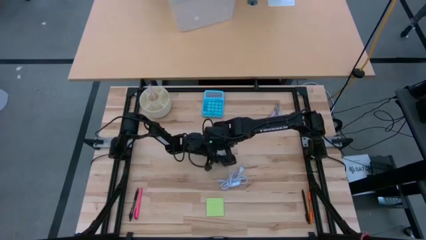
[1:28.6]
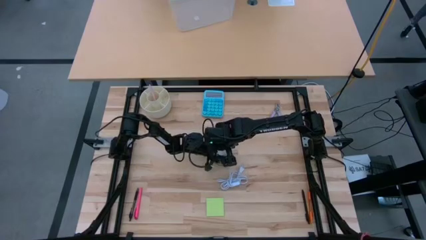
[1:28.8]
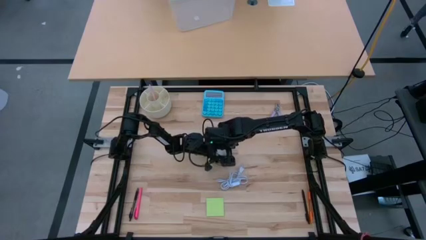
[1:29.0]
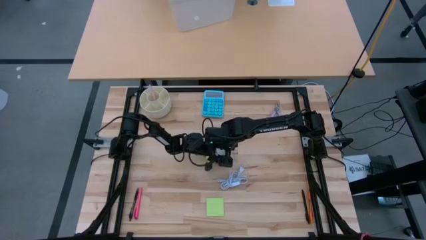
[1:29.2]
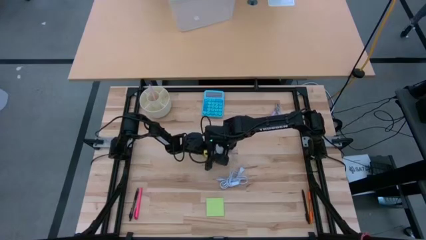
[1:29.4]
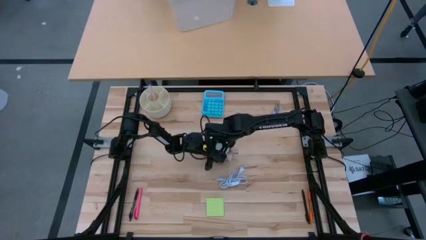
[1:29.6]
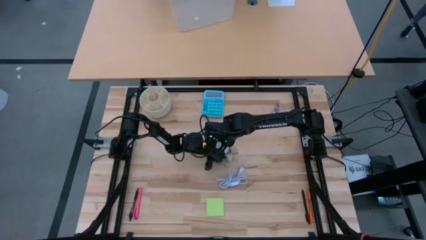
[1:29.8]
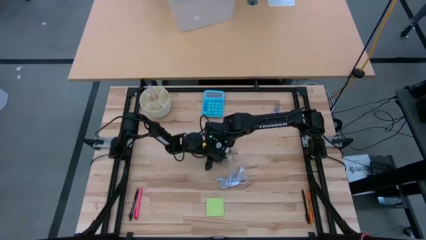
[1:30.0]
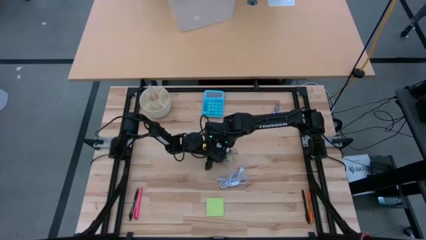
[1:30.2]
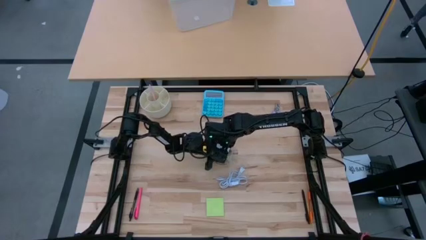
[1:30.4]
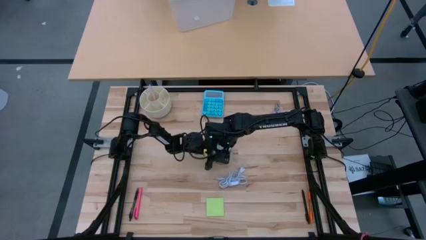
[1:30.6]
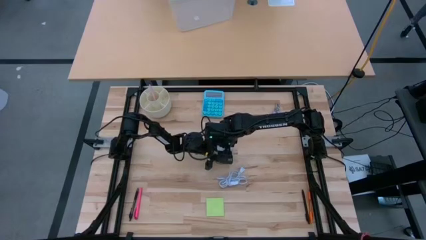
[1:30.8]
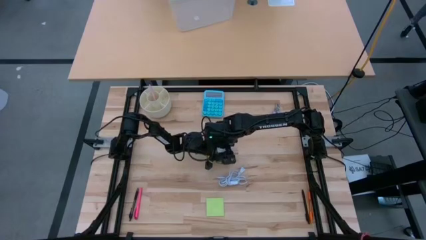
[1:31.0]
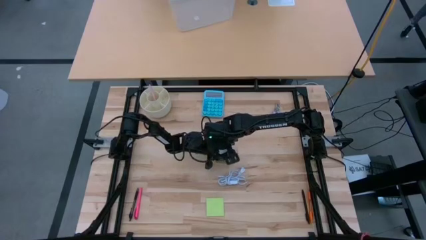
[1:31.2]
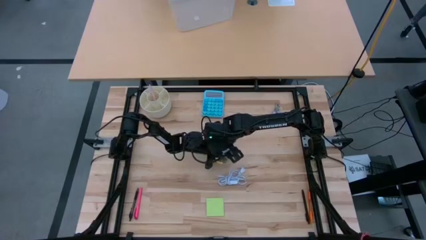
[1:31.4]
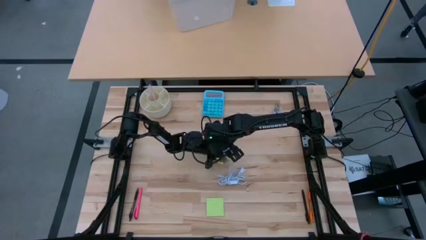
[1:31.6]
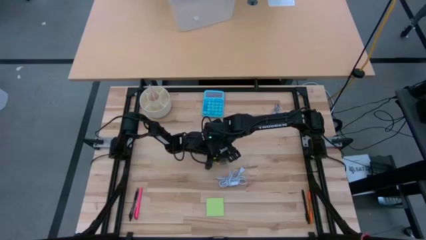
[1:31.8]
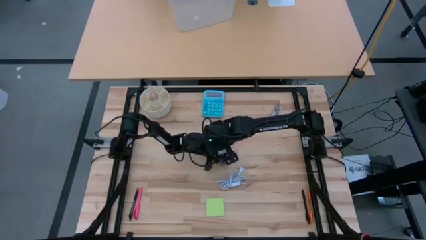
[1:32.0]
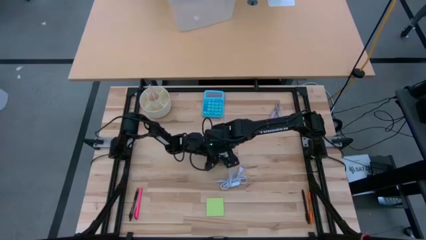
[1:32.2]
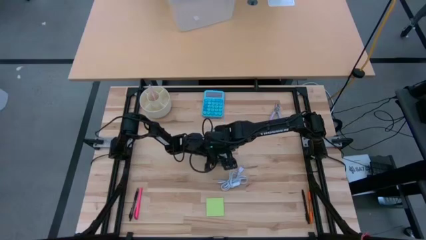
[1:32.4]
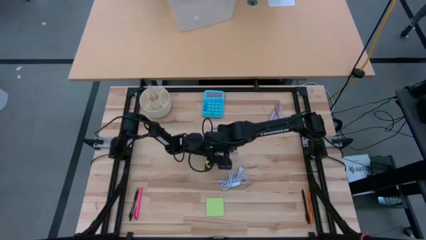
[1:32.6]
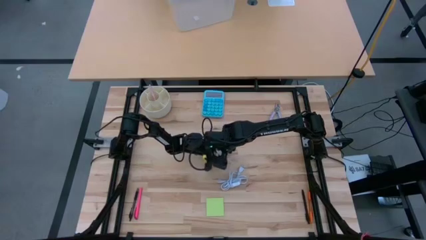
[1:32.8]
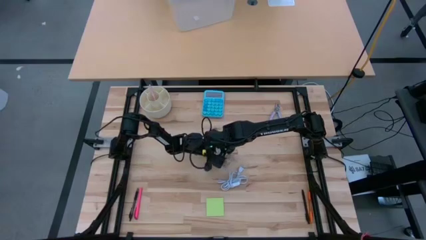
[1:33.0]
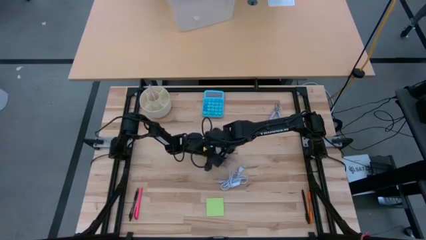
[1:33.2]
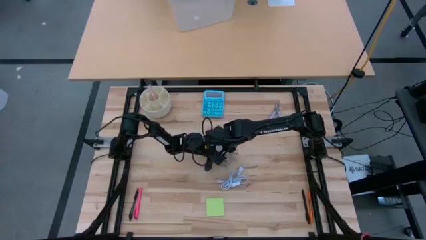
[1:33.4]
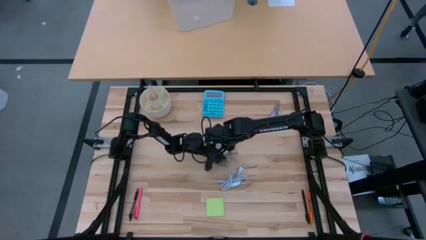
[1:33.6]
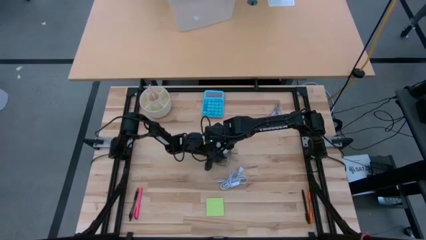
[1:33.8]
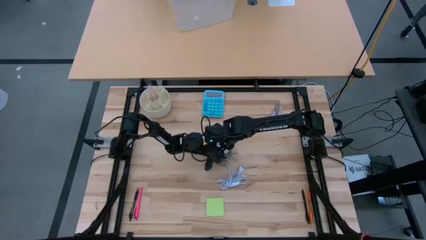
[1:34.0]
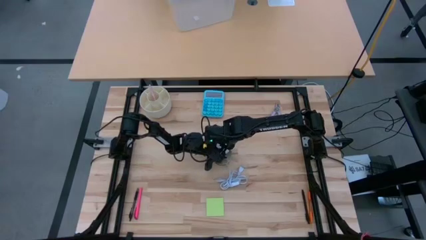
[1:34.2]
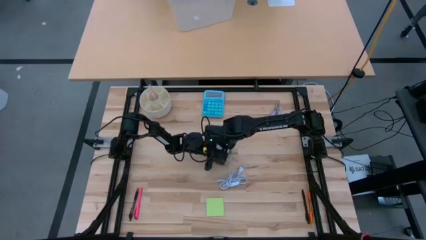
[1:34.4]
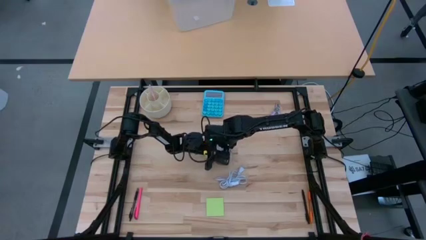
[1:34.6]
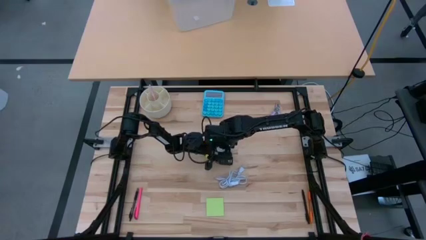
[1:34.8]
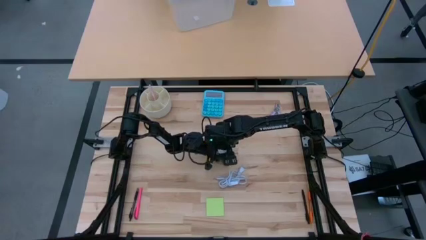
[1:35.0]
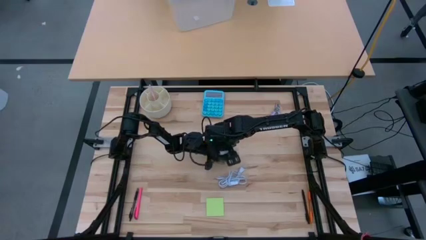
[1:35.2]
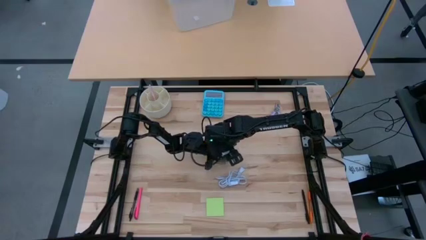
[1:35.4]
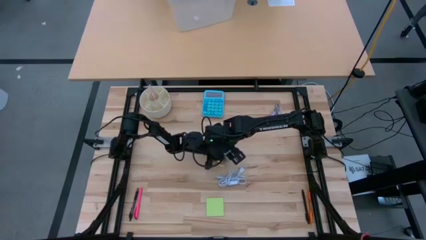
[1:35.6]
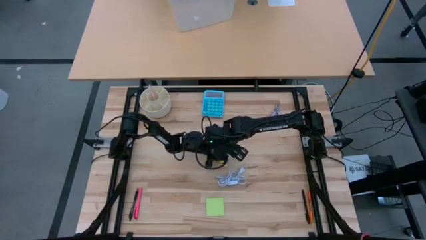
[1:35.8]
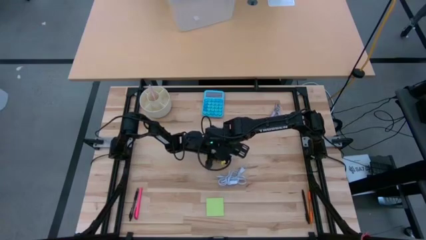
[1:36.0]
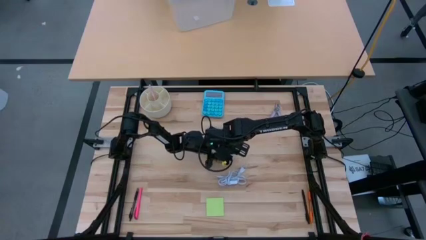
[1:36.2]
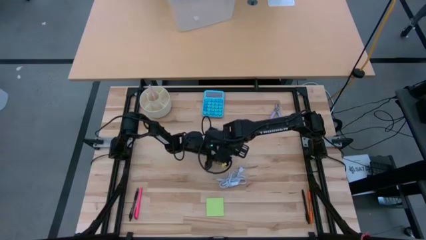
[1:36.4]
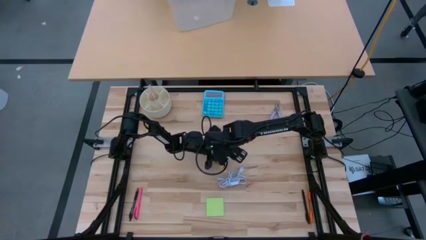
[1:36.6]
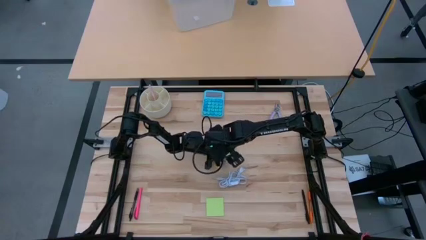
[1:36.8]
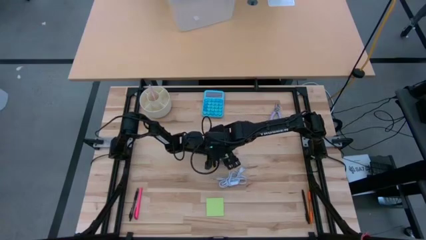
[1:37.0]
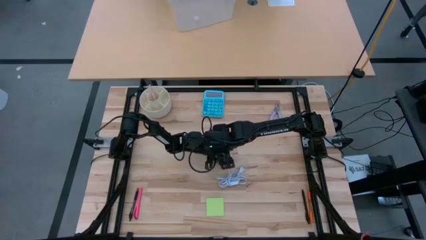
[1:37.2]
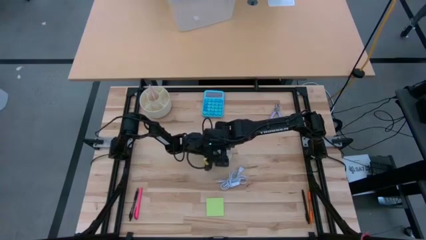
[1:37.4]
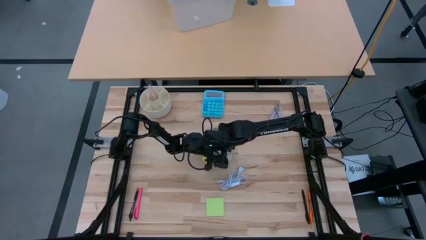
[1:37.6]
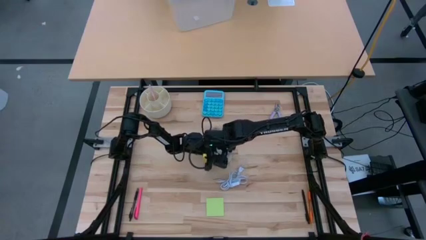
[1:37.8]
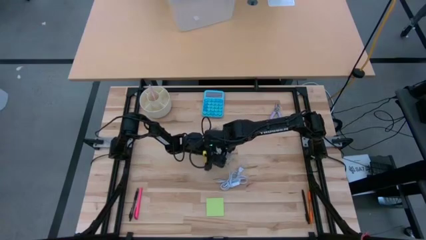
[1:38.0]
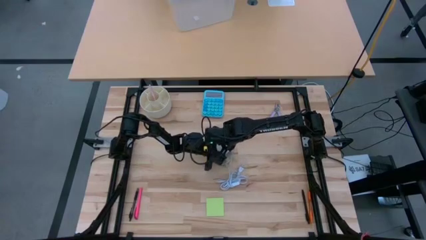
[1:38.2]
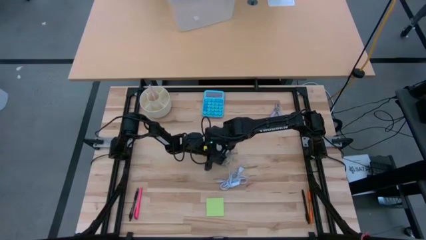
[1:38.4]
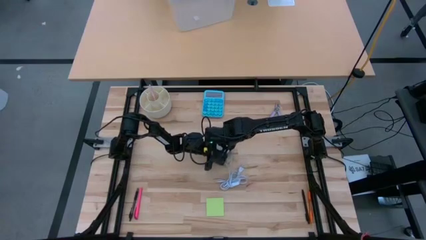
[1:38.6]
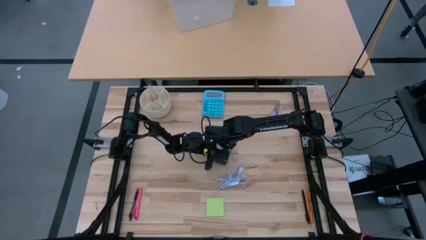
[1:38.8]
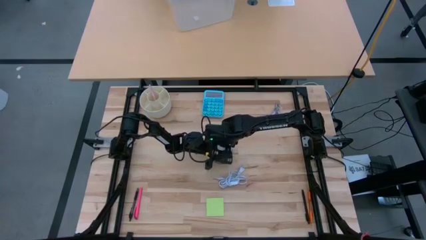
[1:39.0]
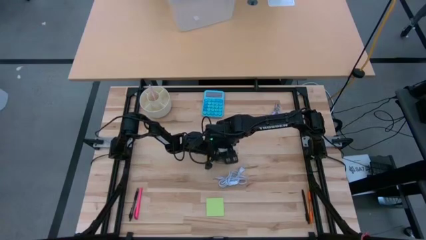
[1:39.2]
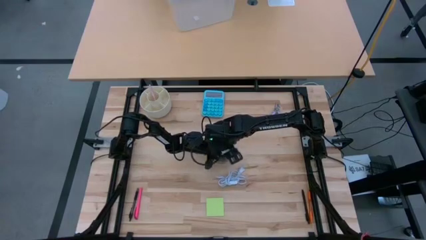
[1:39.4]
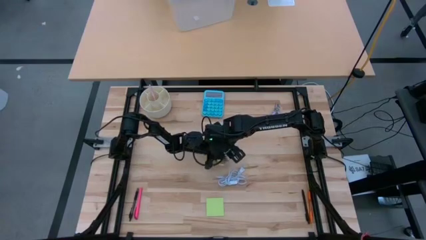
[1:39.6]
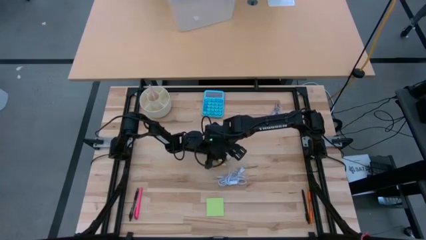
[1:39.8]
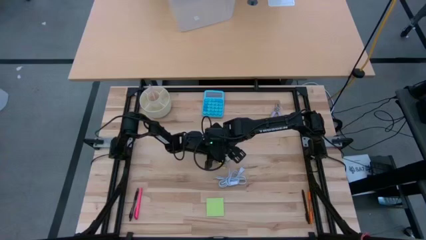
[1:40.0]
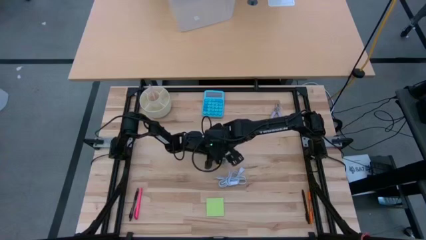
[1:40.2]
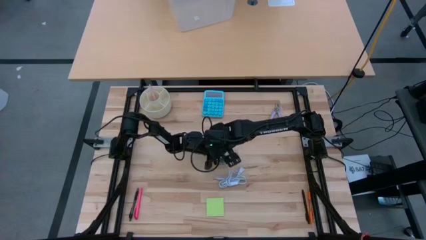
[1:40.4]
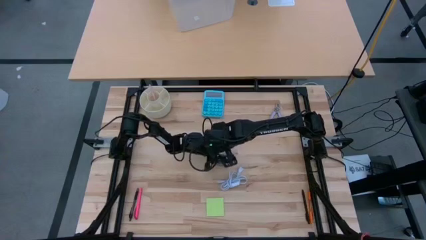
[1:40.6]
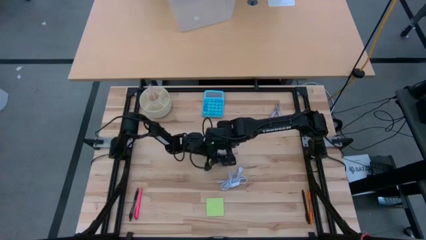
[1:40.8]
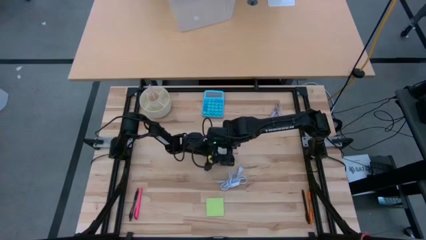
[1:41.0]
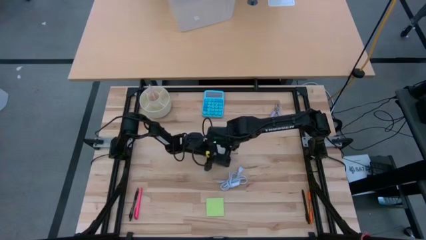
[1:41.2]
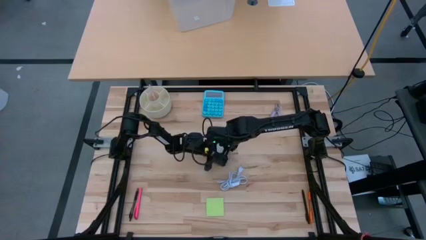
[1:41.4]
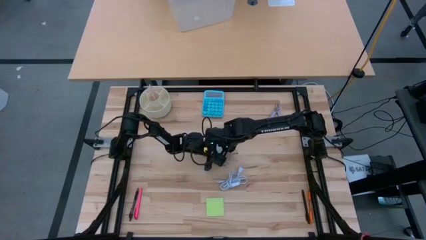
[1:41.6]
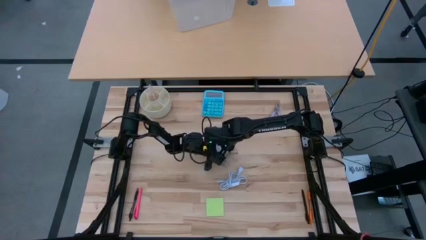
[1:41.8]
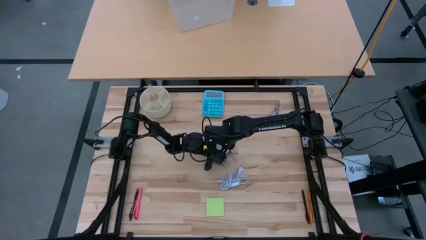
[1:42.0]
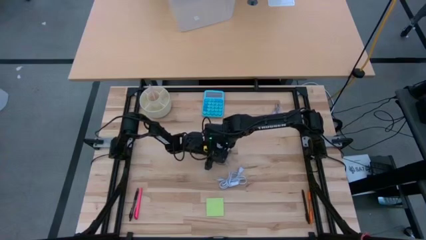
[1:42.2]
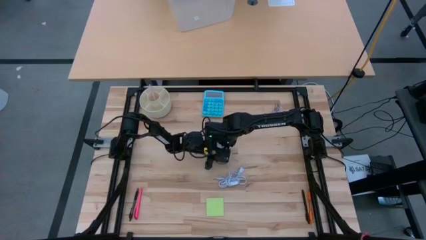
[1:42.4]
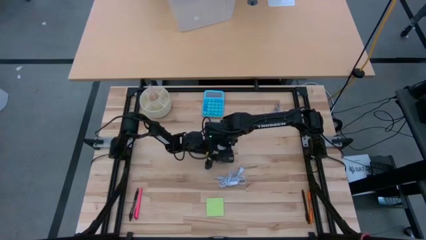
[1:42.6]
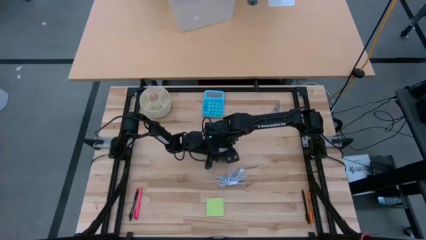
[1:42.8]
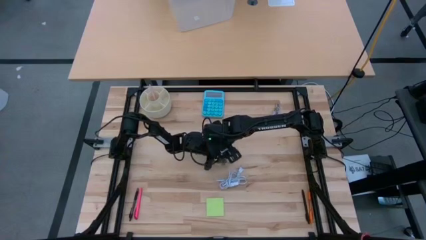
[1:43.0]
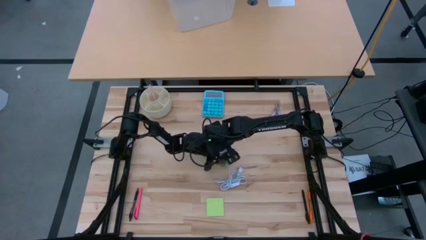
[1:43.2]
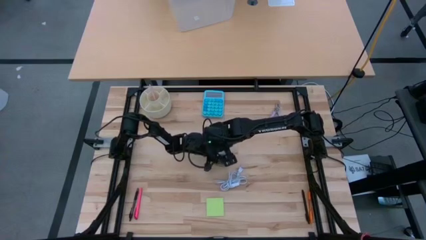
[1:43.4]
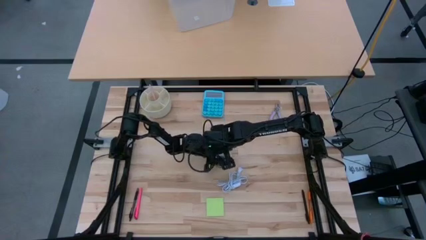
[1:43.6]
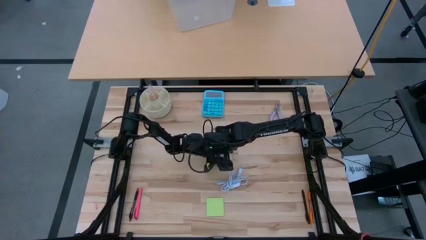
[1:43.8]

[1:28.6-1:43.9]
Task: Screw lightbulb
Remove the lightbulb from the lamp
